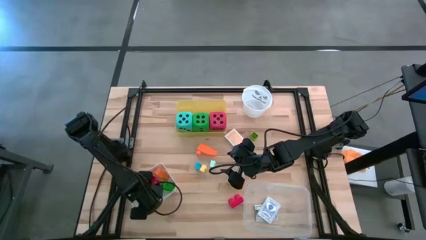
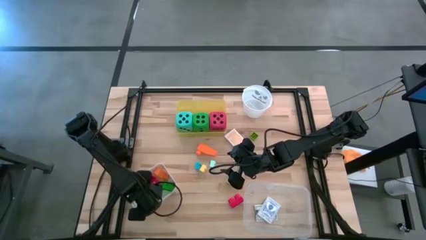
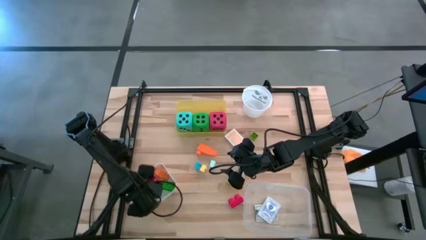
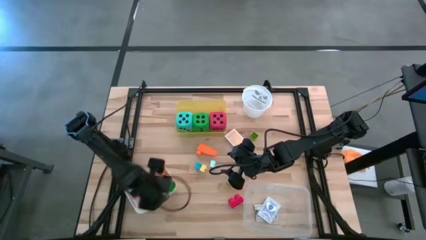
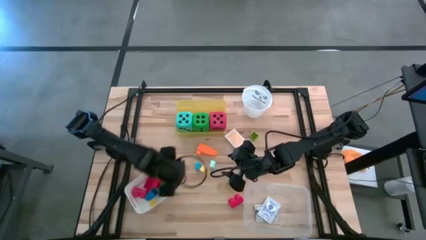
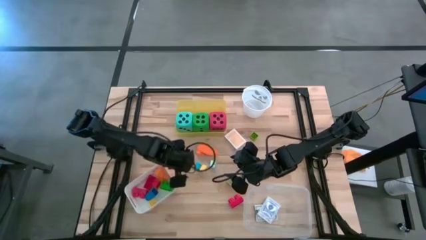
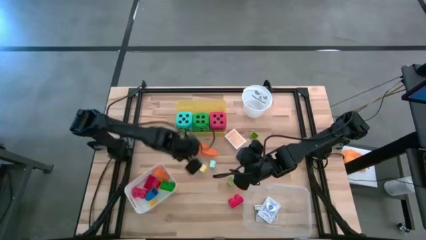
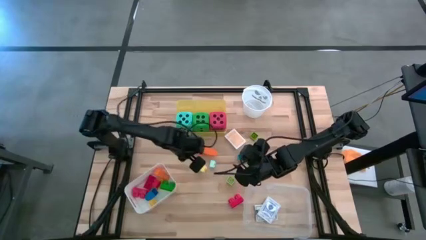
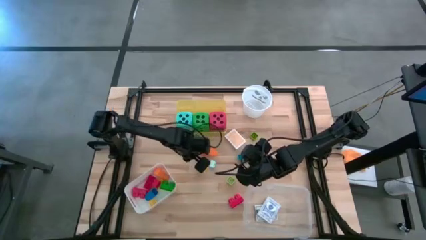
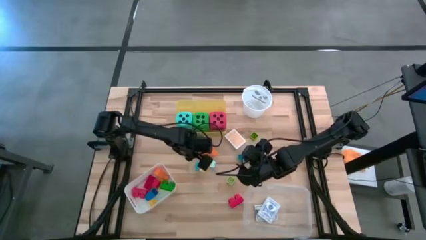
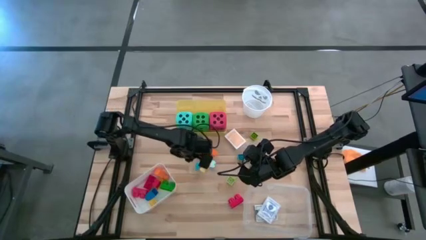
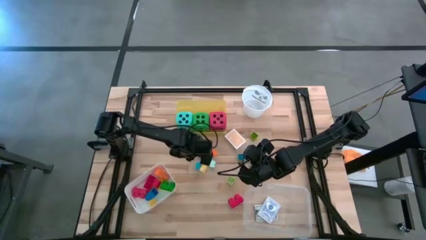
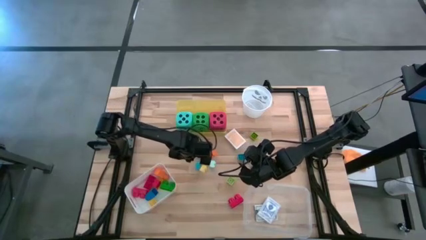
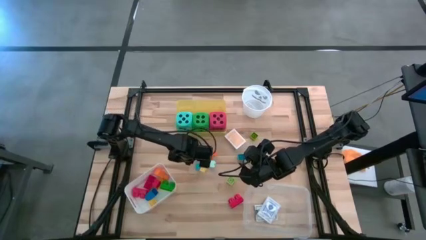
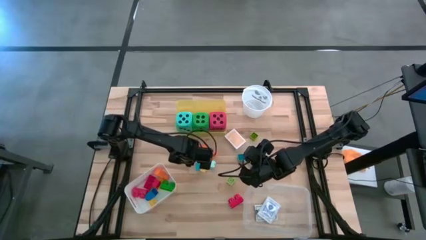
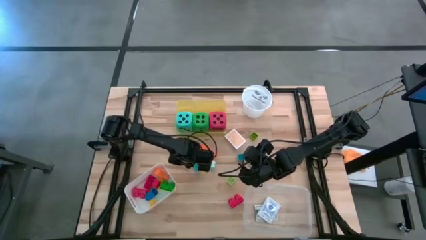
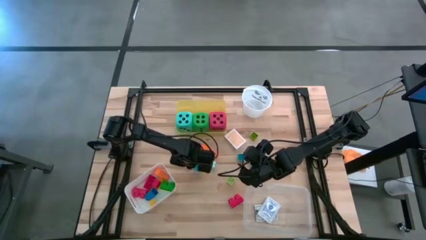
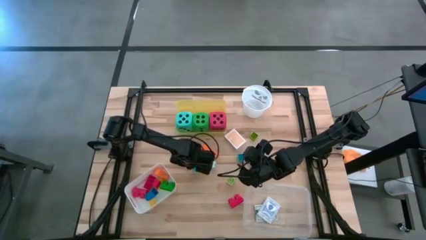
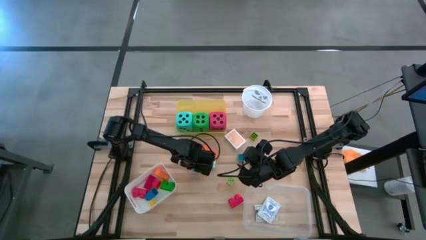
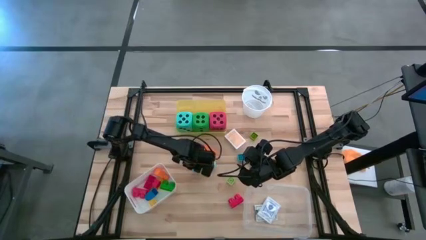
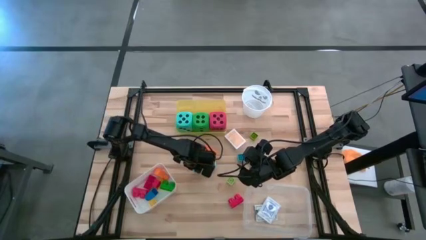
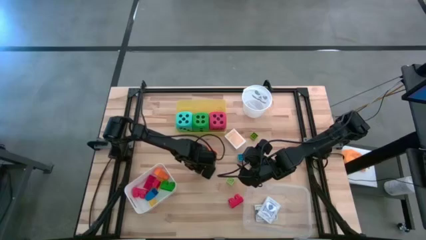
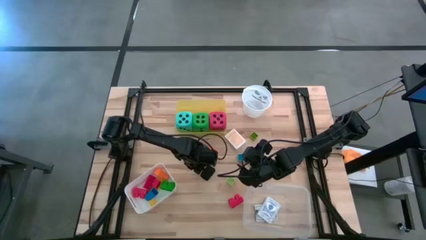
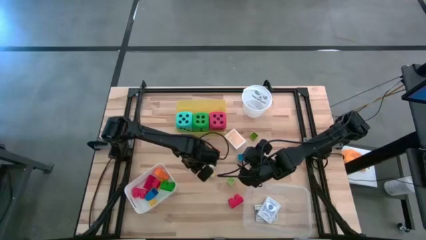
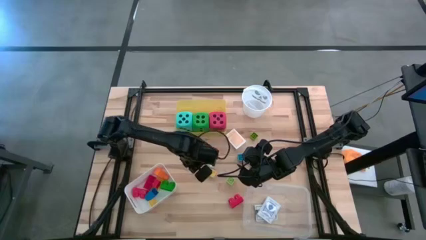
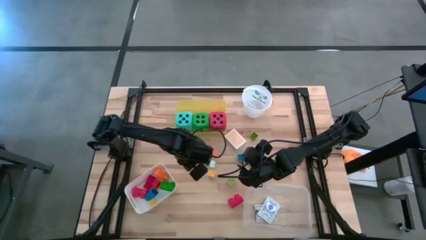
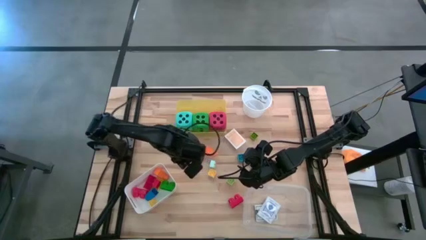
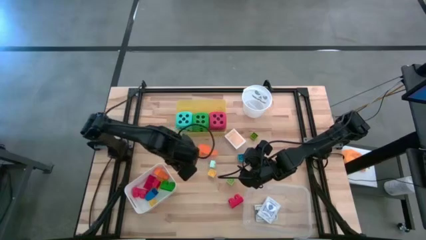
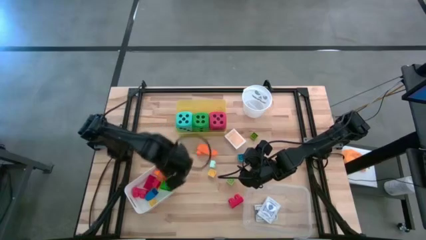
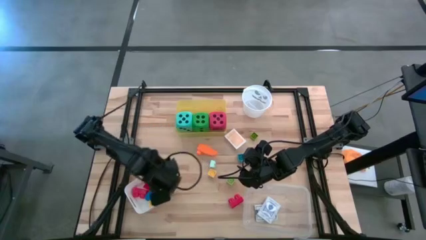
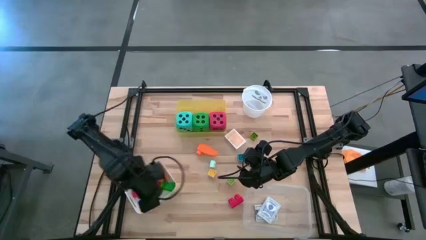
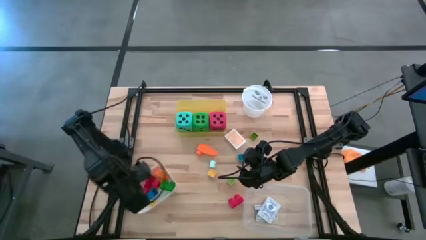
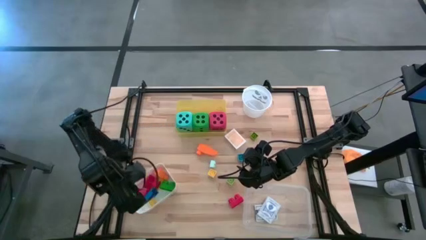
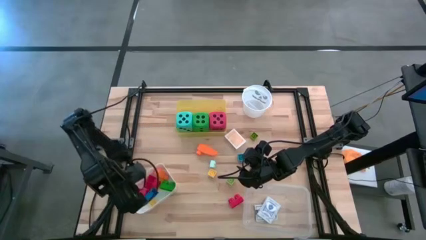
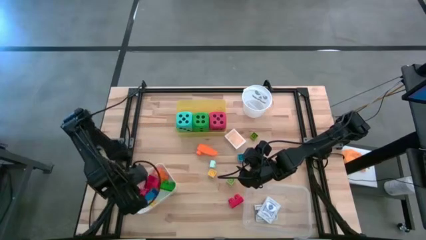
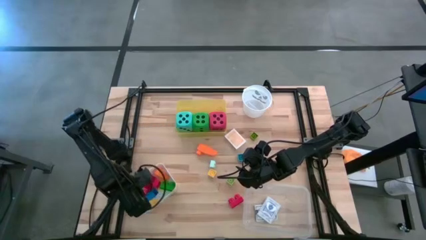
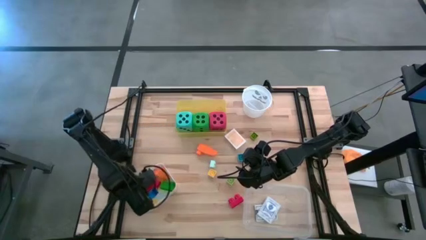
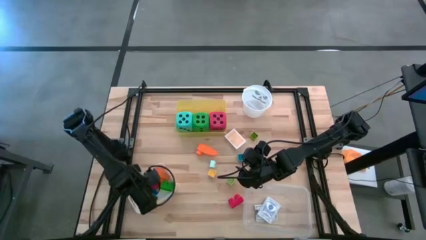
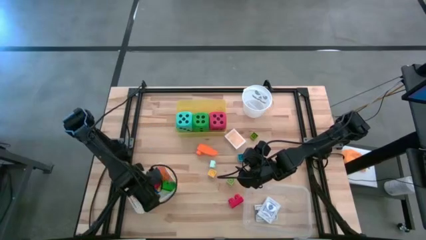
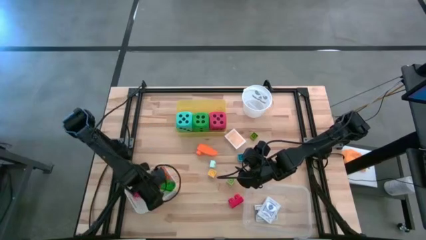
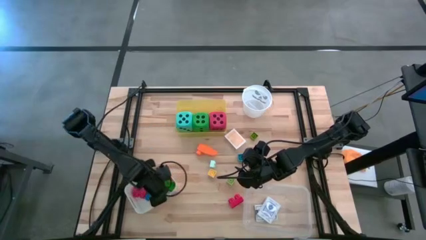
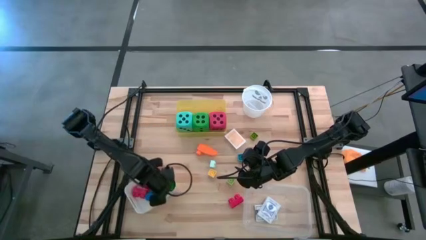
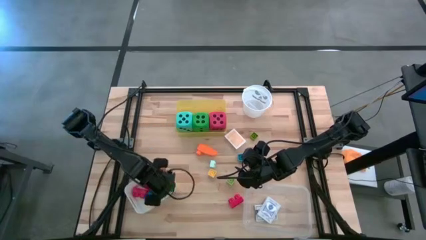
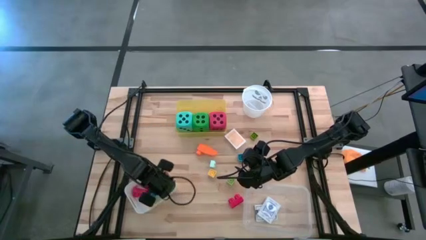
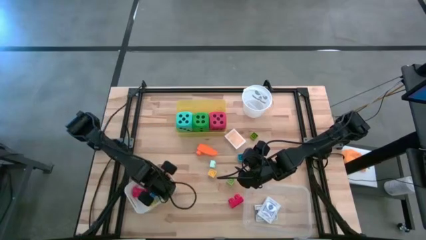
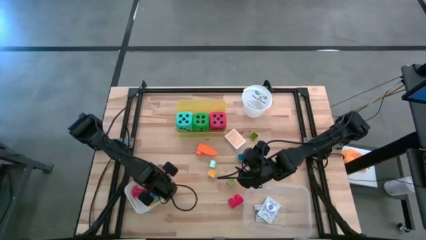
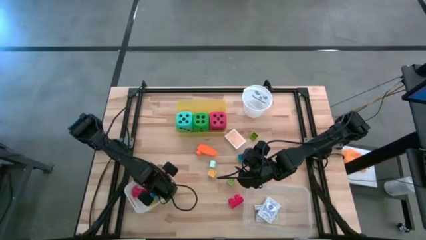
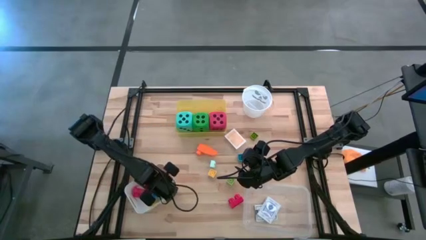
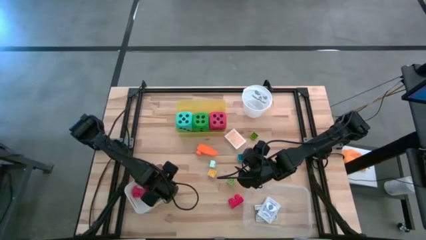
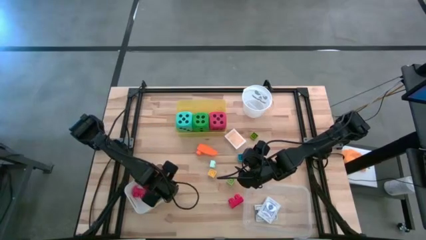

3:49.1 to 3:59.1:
Task: Pick & Place Toys
Put the blue game piece into the white bin

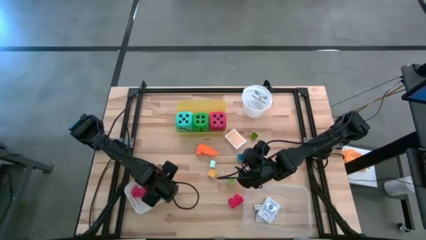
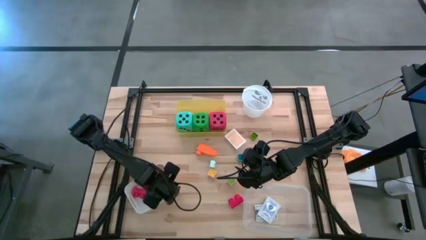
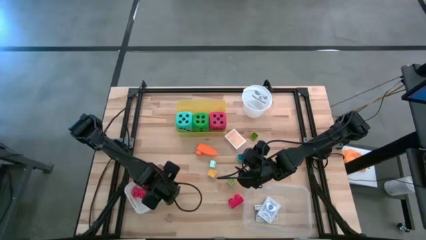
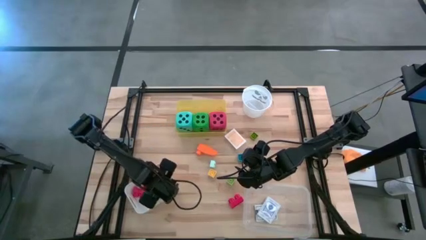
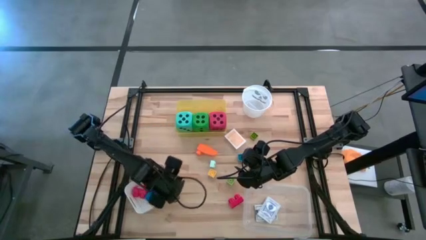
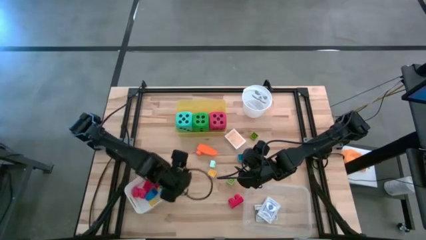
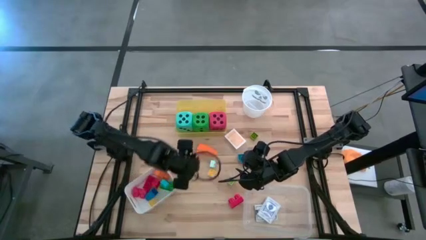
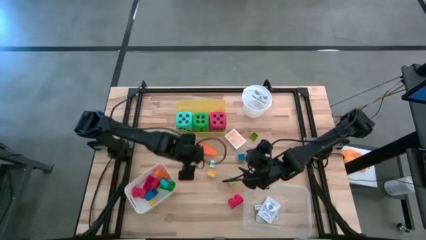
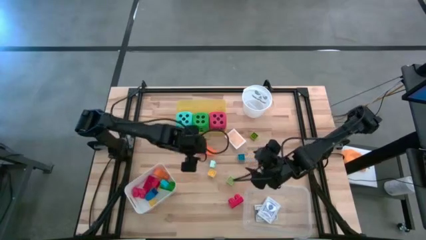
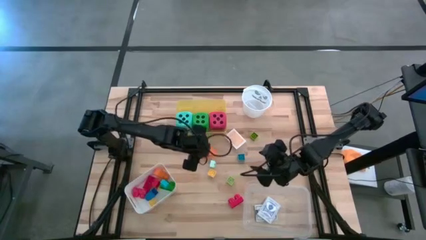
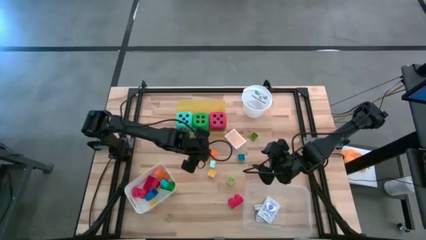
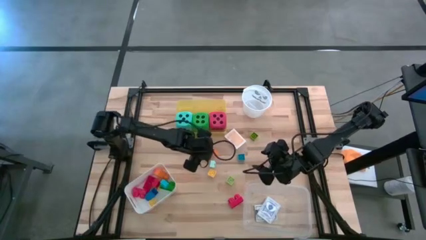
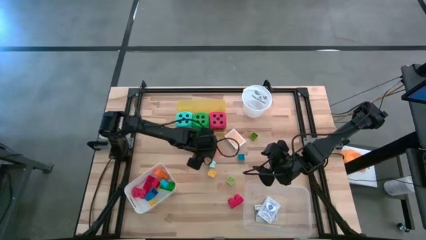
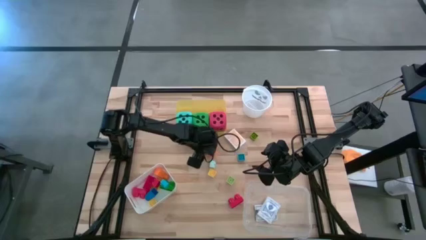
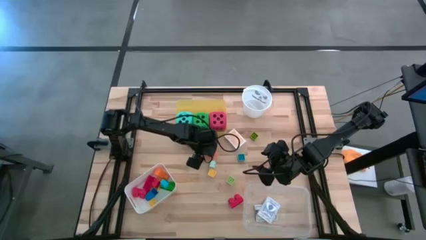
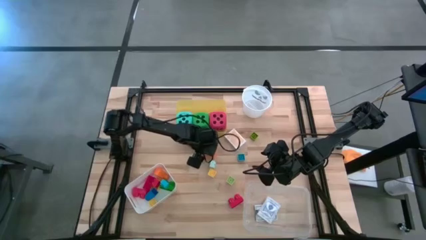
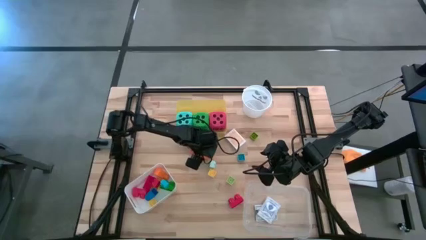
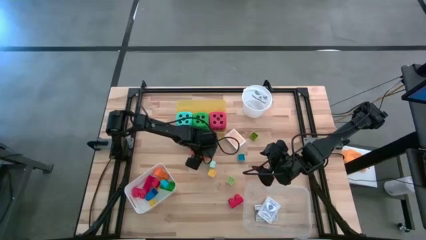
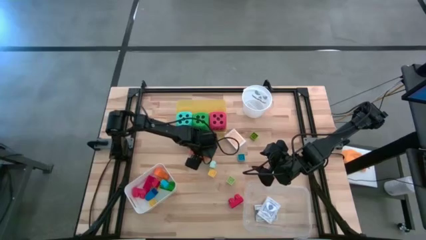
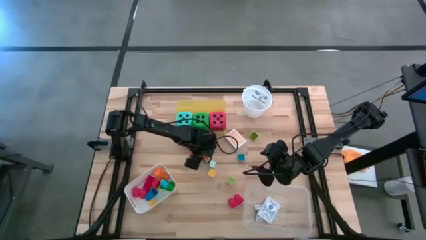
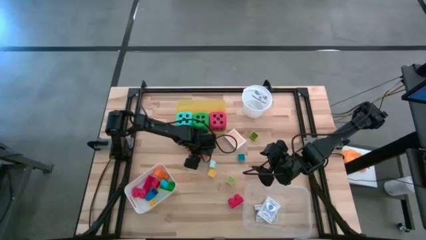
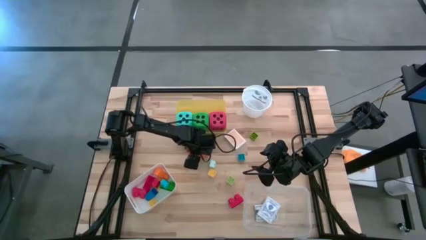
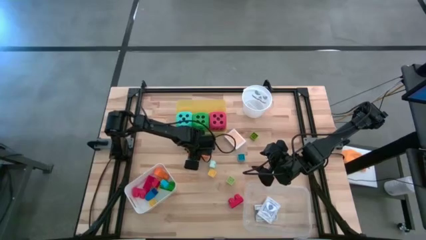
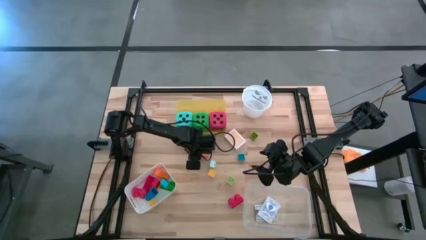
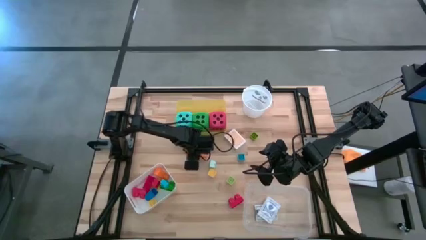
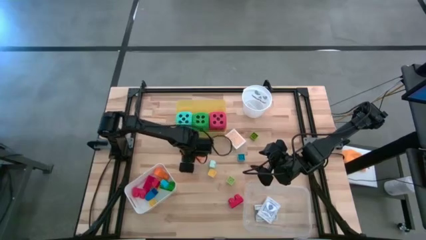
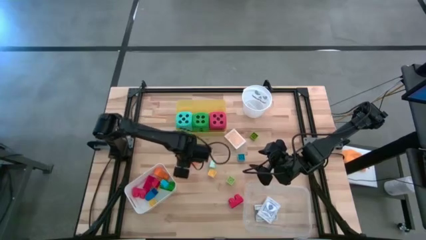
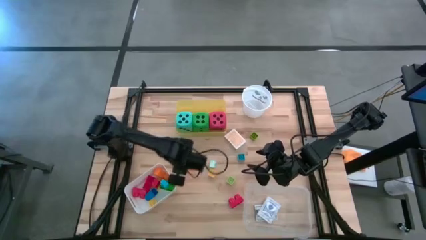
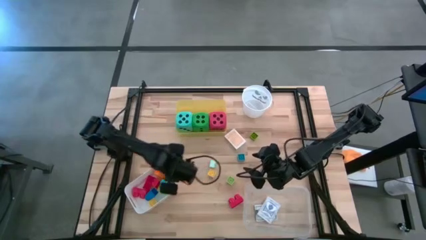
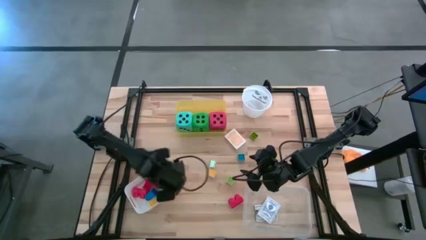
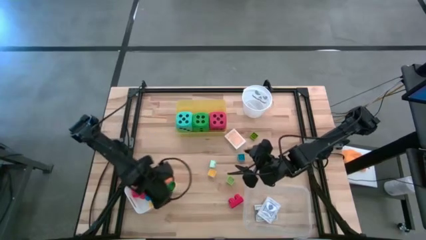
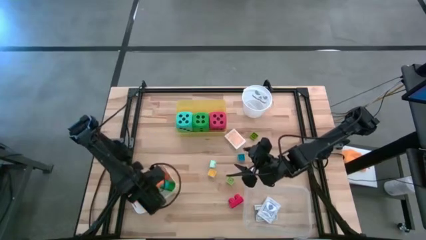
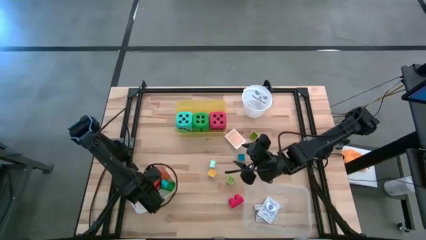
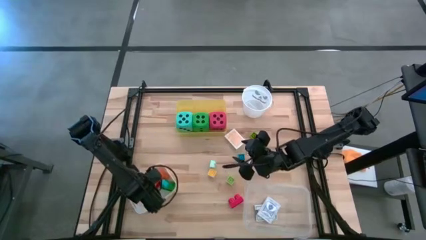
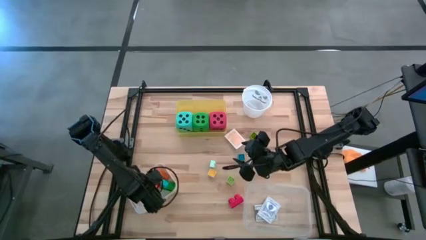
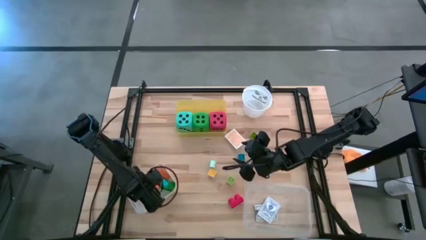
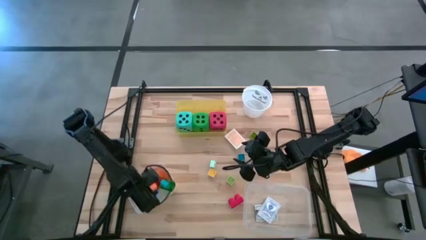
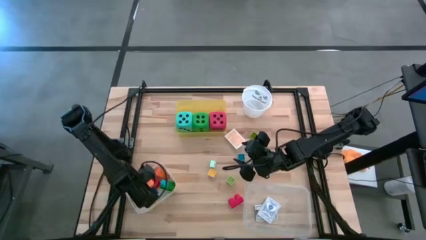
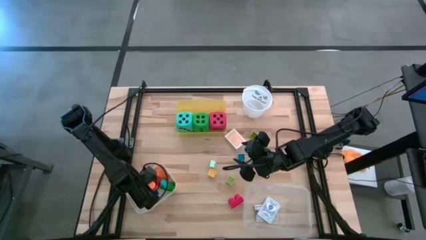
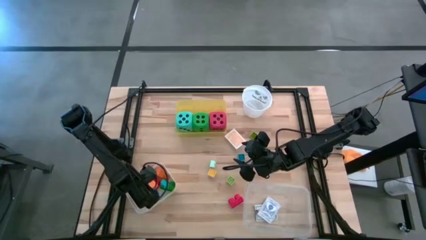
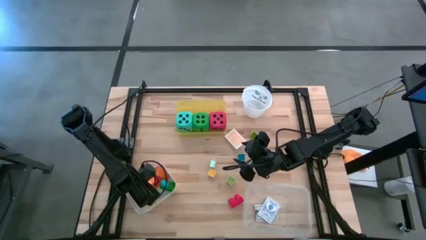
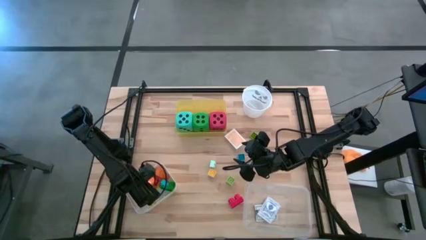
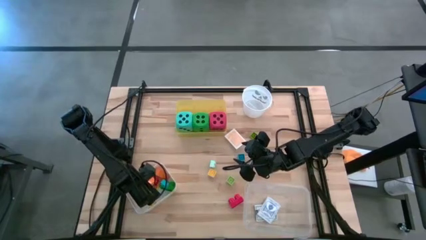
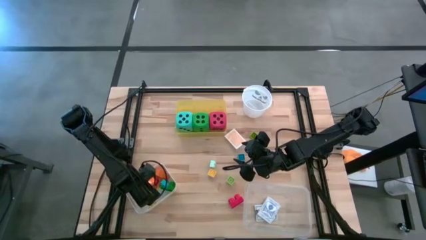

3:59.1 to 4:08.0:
Put the orange game piece into the white bin
